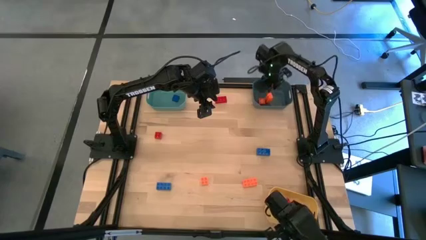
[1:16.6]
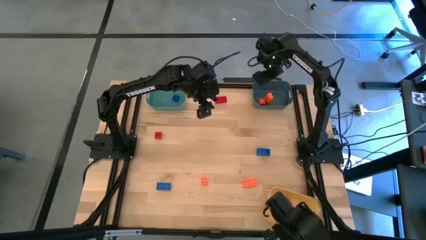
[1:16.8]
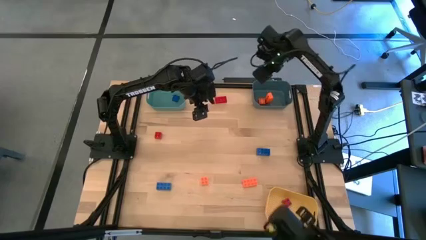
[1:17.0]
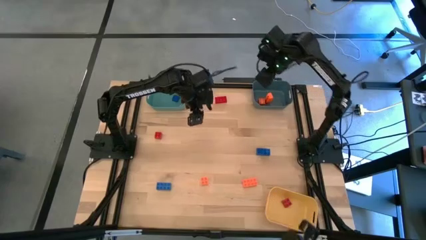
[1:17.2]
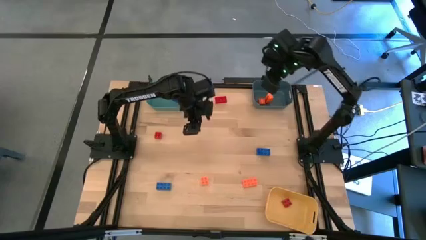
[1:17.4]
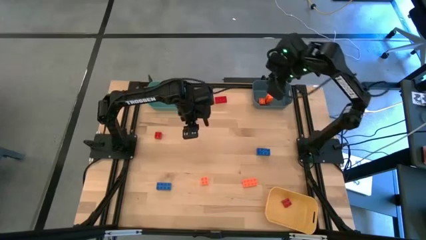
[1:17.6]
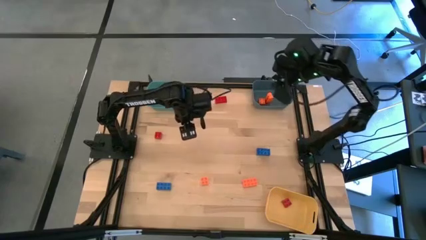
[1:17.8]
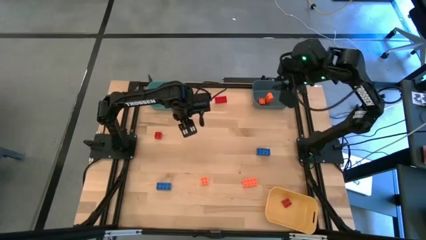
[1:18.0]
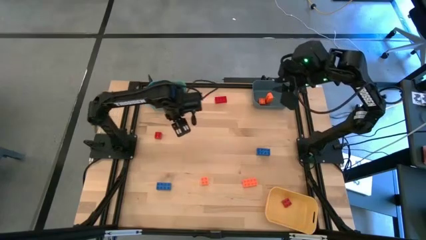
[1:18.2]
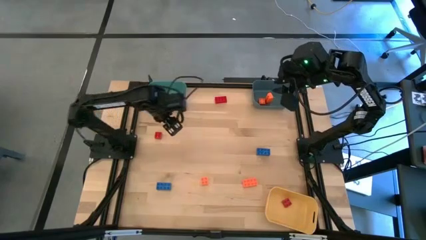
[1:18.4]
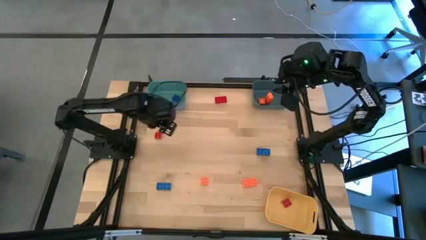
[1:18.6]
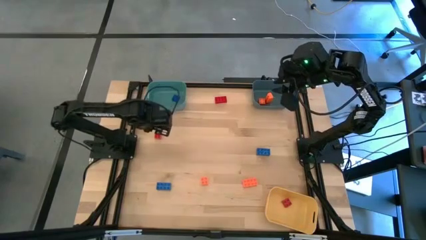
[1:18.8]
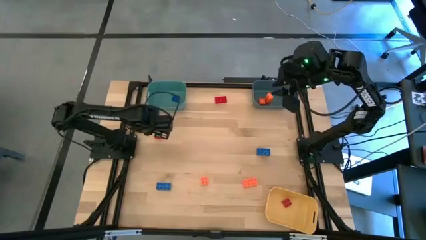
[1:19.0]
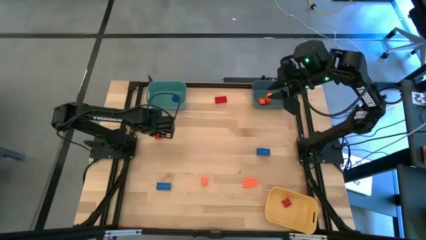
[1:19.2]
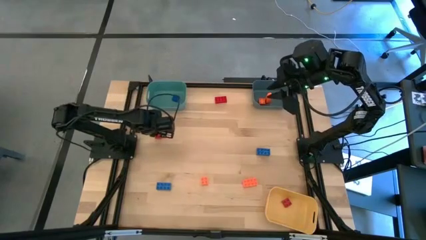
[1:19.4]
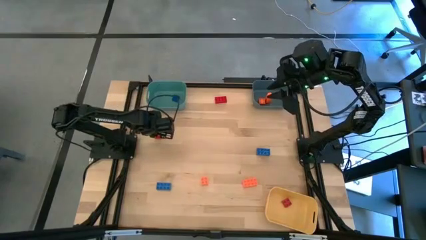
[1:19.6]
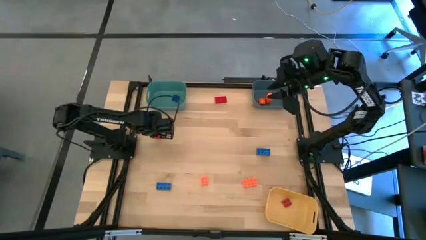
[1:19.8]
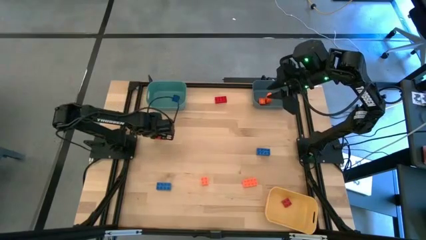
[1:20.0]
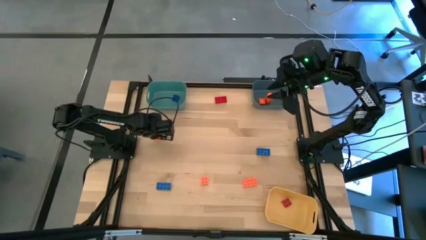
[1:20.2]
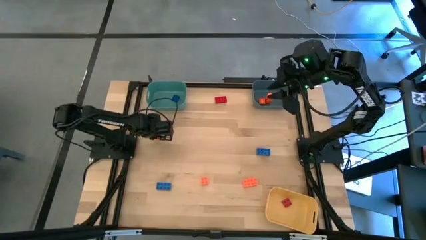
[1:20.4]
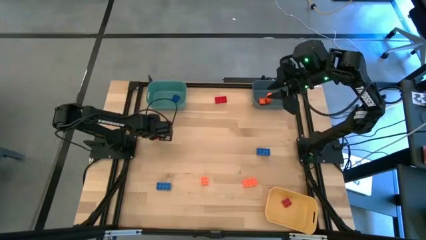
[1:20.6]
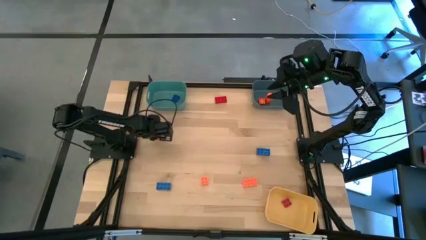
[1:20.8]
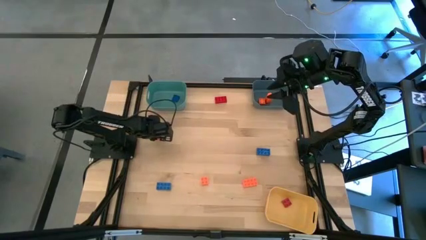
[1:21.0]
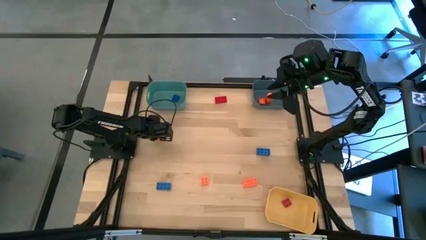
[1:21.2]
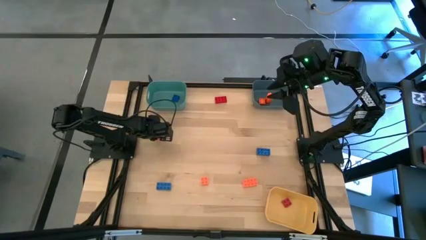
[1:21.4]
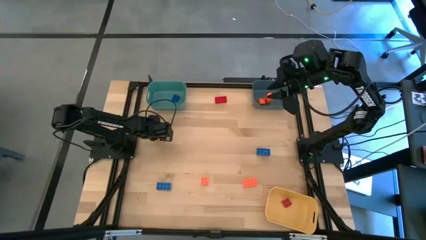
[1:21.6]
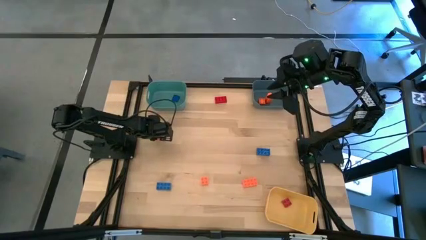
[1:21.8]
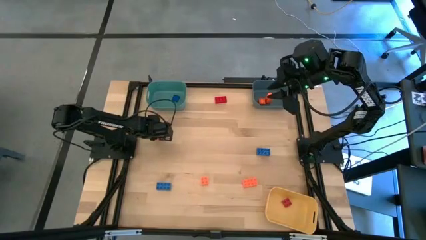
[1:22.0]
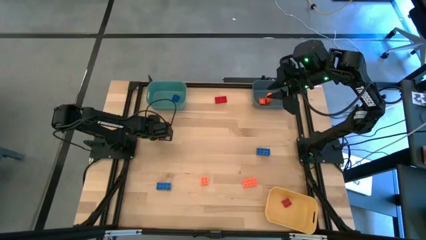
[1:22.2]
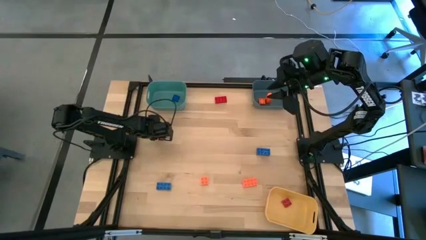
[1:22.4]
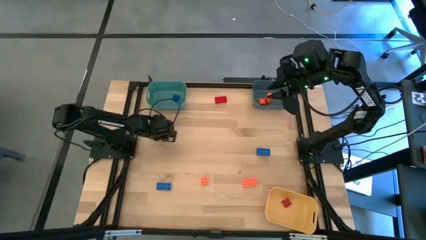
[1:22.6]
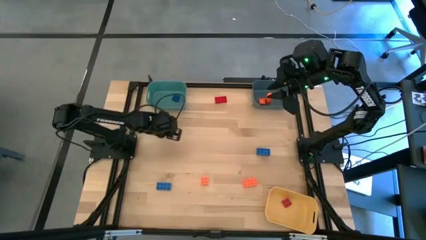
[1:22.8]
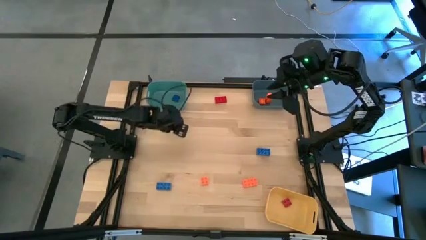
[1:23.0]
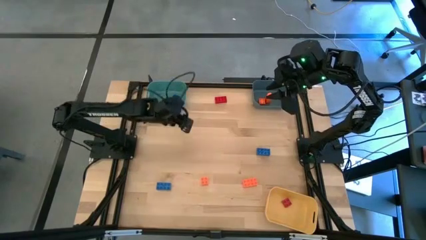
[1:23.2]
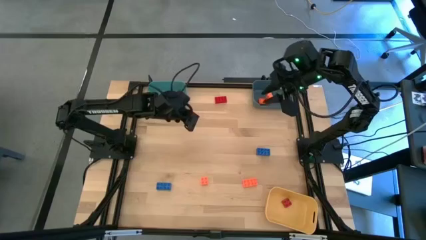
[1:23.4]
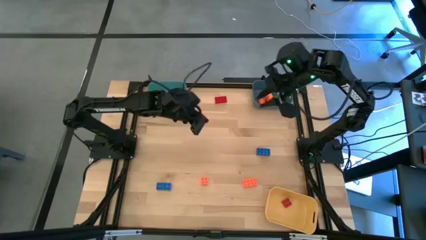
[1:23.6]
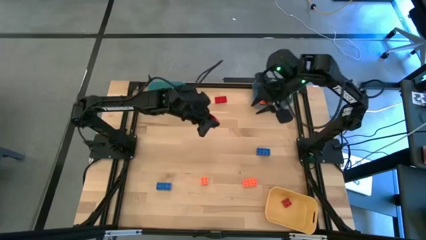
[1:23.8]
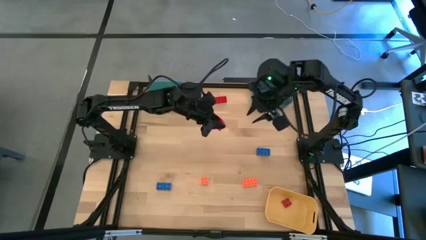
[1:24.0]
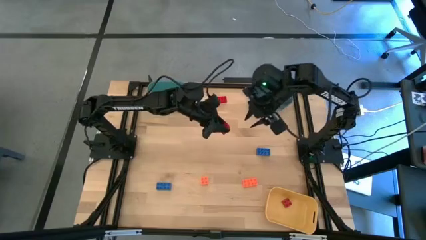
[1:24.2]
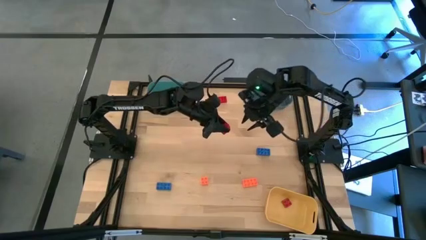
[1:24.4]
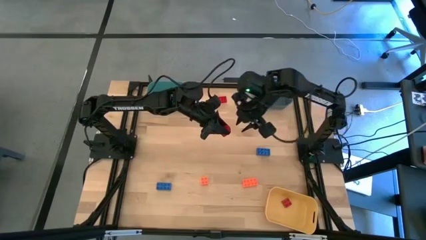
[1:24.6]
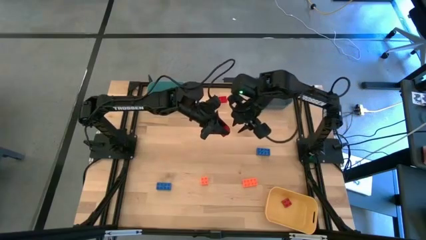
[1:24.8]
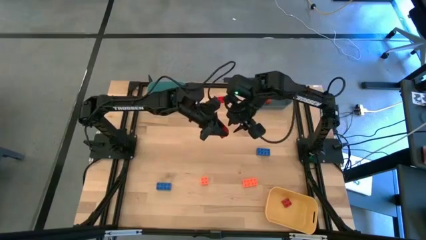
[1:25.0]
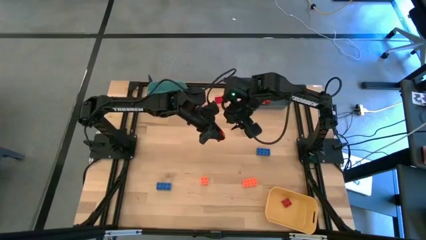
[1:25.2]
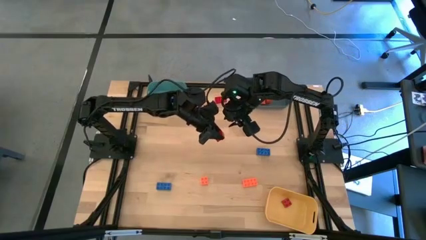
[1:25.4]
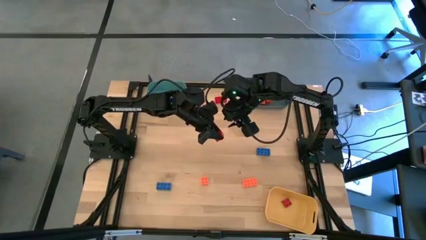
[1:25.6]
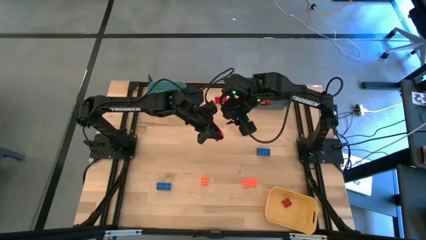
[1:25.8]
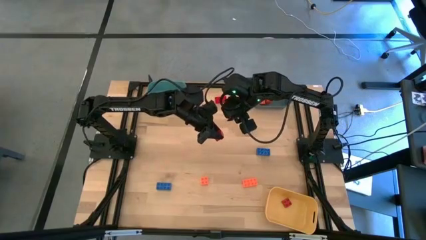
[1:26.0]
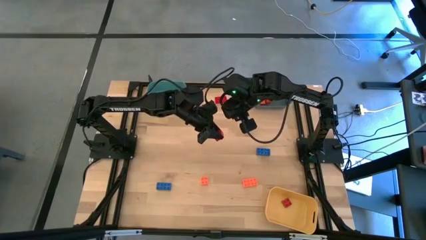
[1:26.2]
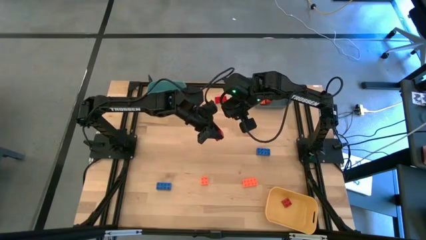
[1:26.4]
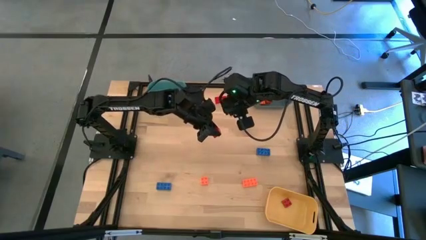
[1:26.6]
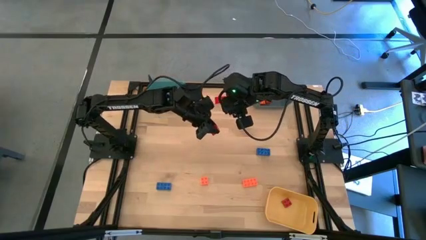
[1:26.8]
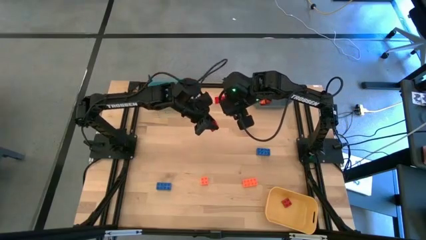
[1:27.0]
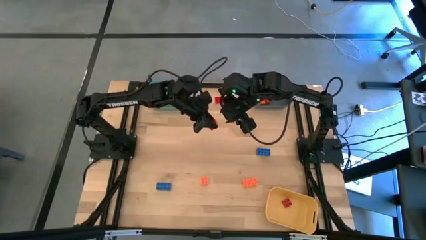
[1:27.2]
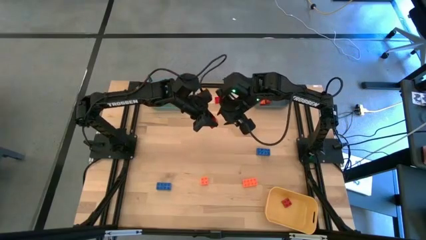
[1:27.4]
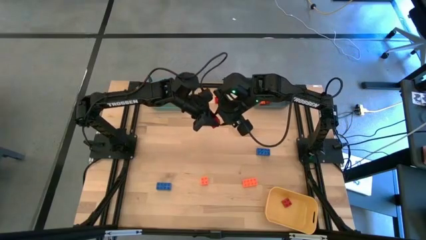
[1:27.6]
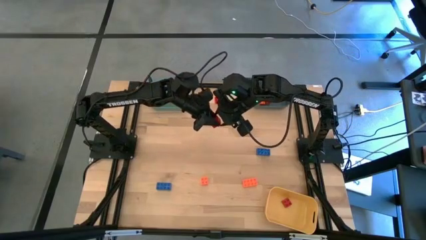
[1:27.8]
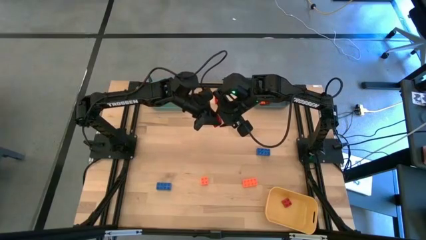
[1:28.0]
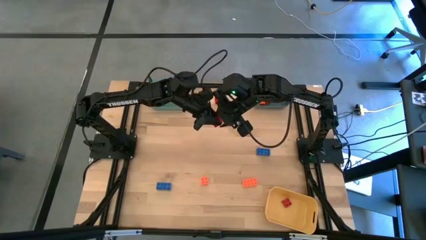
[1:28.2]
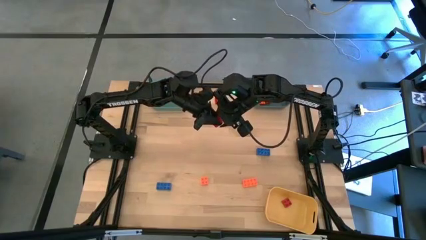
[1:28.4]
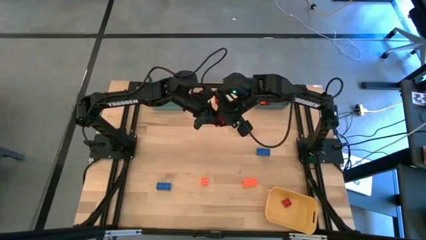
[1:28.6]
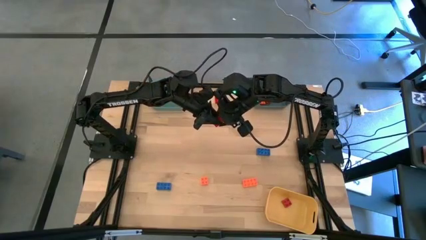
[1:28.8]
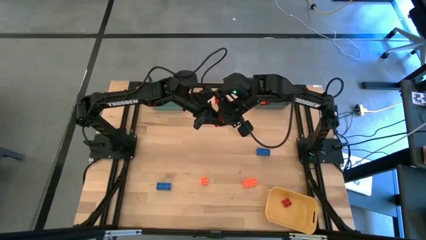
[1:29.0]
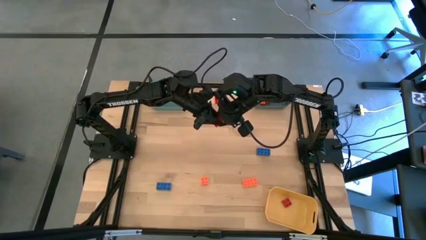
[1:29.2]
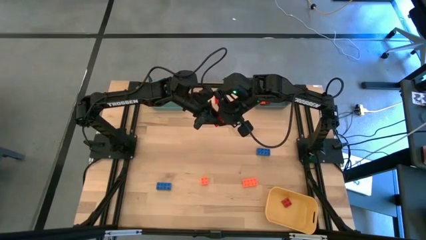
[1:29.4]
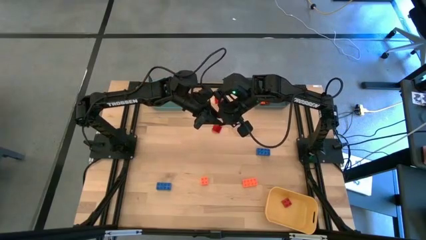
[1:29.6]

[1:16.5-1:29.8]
Task: Sort & place blocks by color
Put the red game piece into the yellow bin

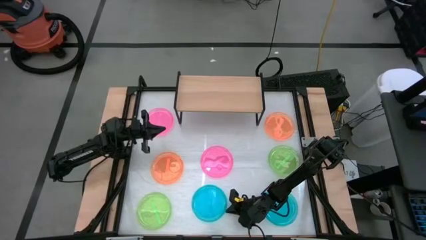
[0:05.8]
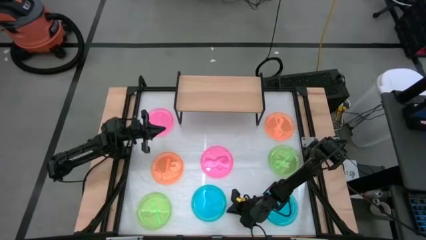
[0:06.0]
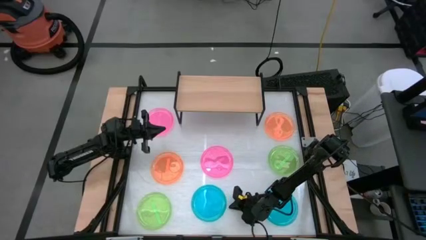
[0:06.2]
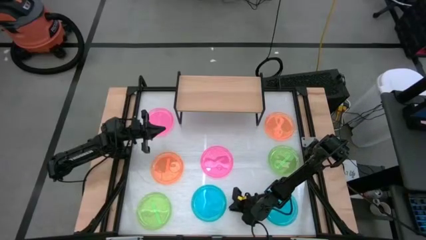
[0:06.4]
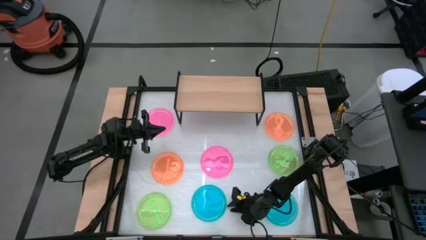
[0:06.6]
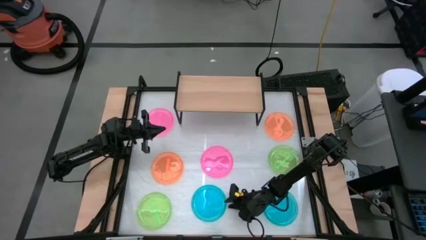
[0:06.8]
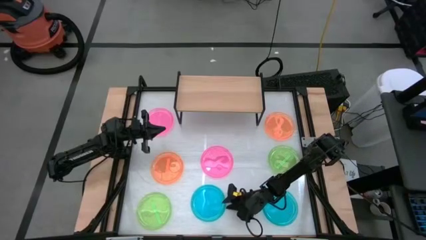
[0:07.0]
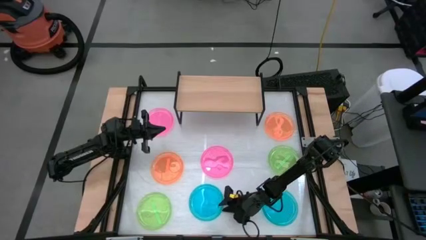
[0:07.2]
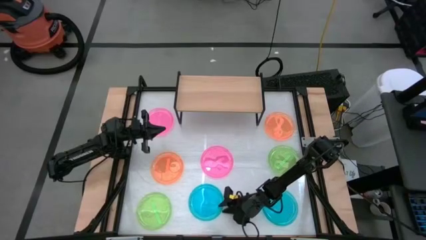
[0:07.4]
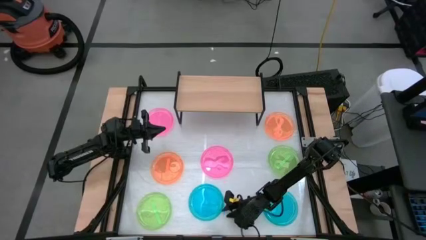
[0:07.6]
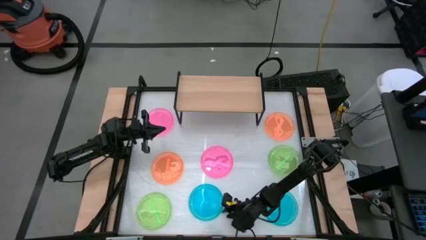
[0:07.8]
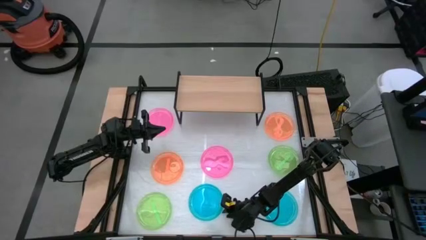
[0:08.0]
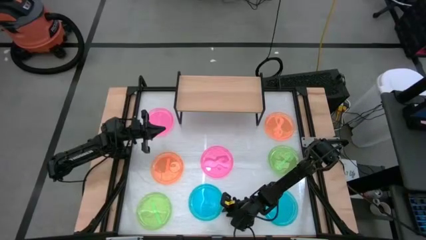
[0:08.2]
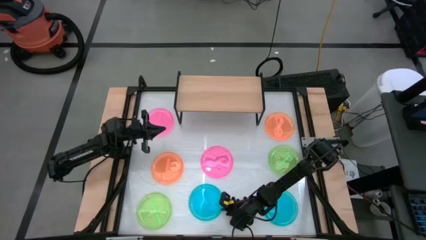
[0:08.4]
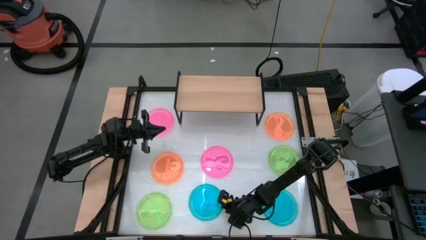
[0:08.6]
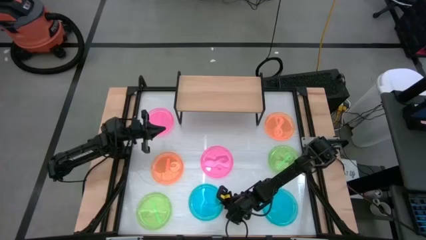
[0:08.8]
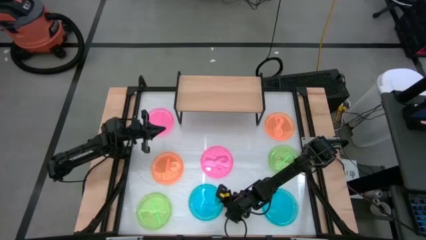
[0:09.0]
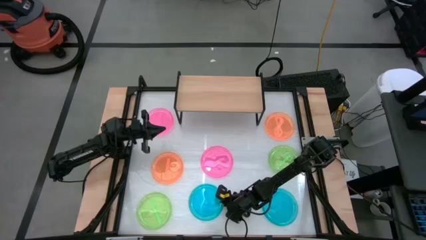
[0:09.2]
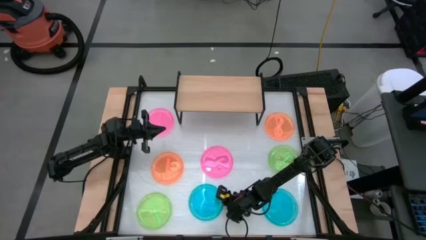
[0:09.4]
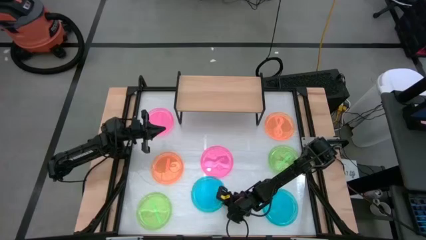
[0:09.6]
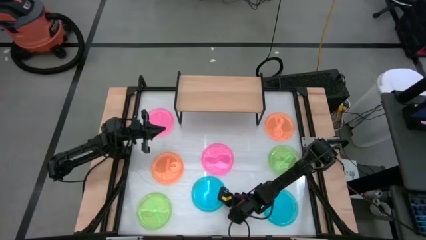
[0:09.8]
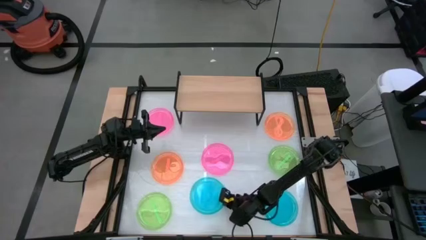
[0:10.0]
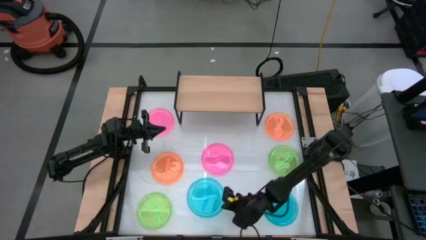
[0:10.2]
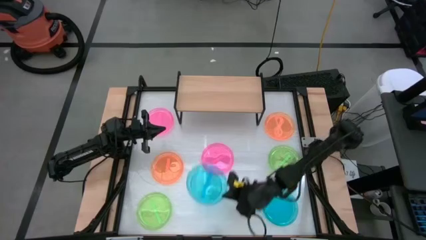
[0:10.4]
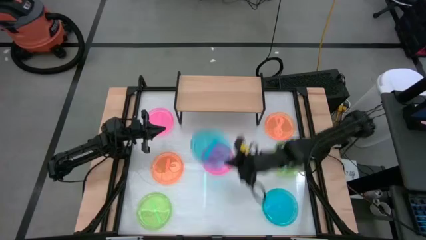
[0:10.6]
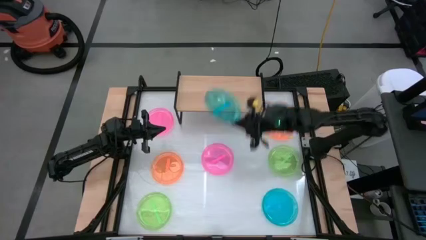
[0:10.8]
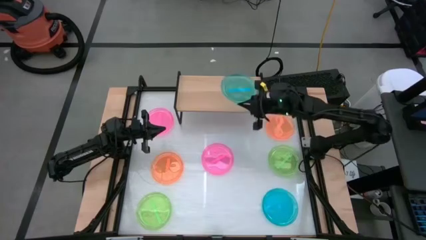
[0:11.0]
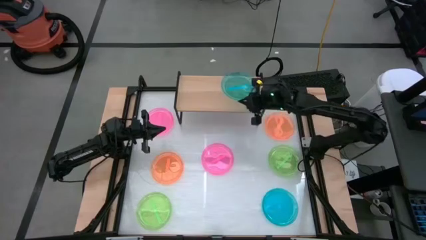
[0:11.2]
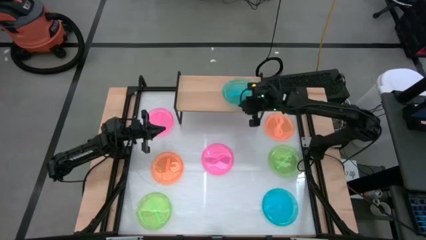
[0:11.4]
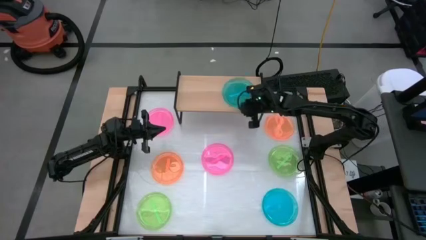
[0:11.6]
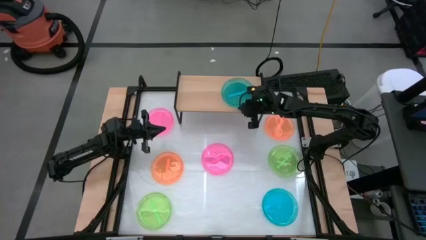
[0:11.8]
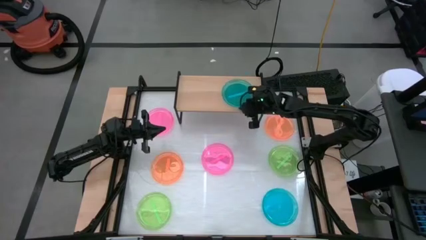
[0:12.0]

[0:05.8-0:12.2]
Task: Place and stack plates onto a shelf
Put the left blue plate onto the shelf
